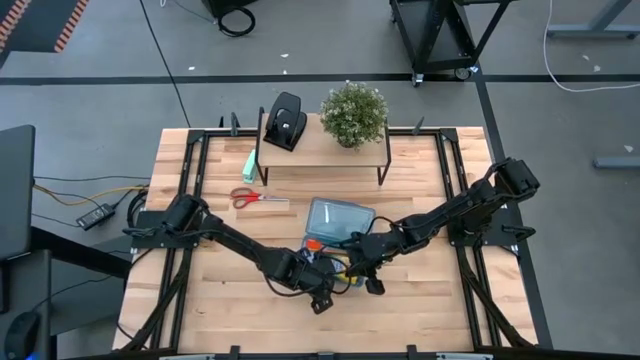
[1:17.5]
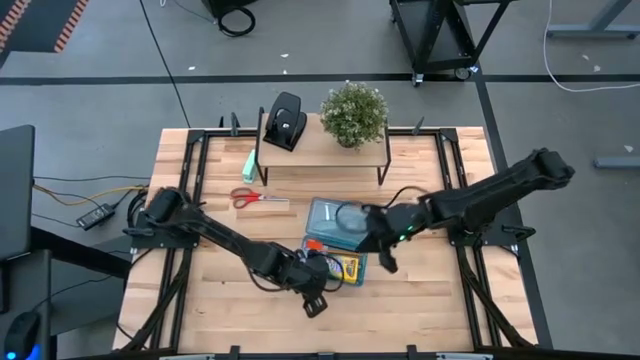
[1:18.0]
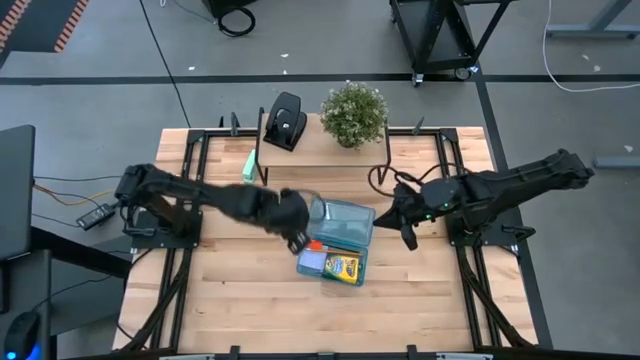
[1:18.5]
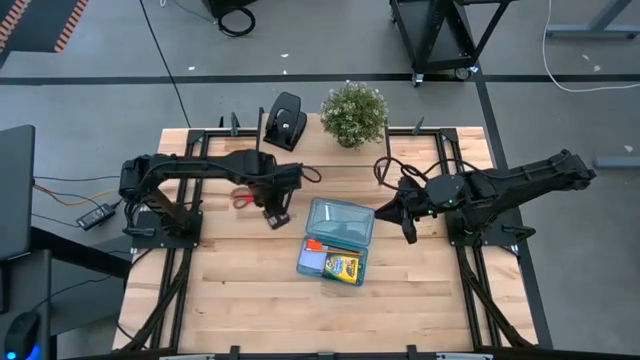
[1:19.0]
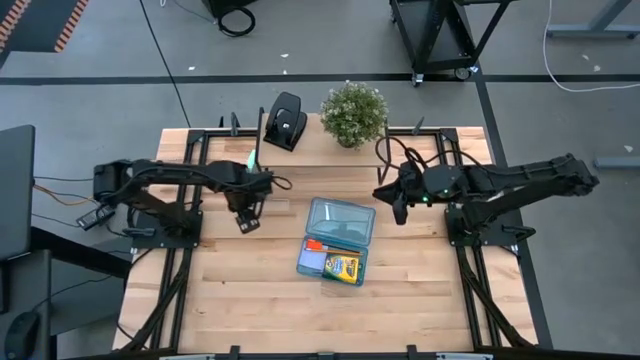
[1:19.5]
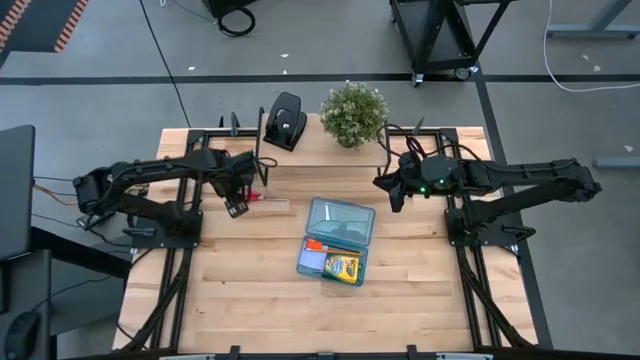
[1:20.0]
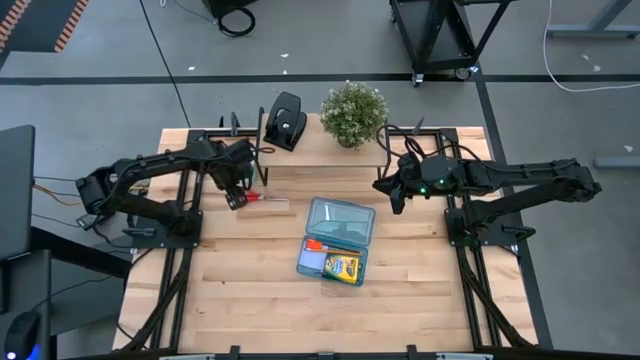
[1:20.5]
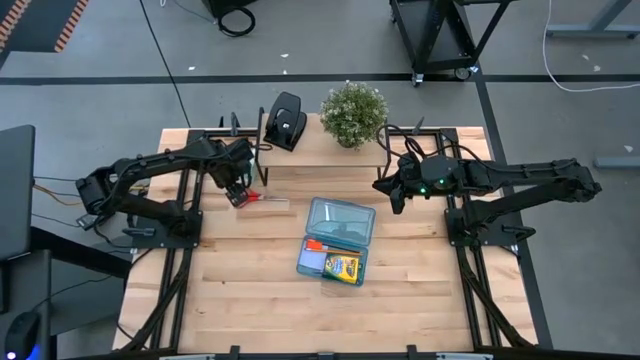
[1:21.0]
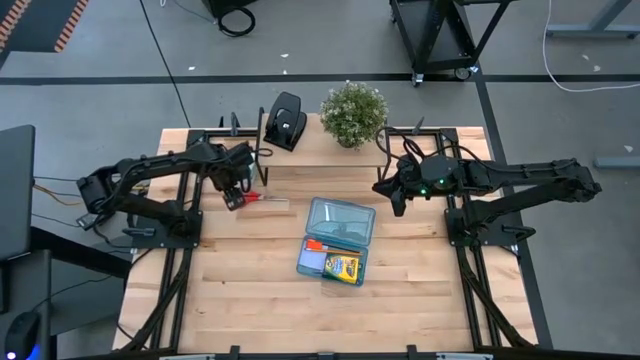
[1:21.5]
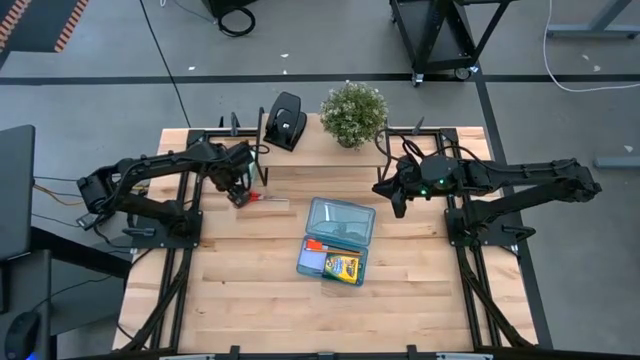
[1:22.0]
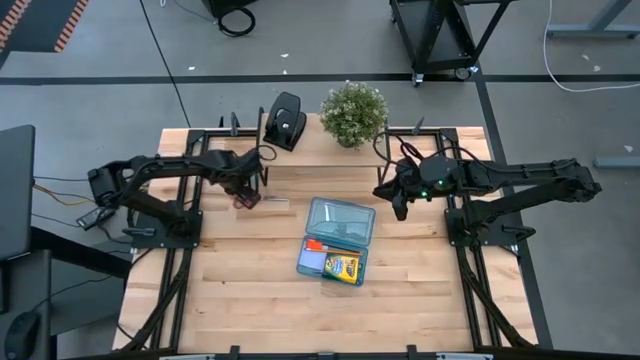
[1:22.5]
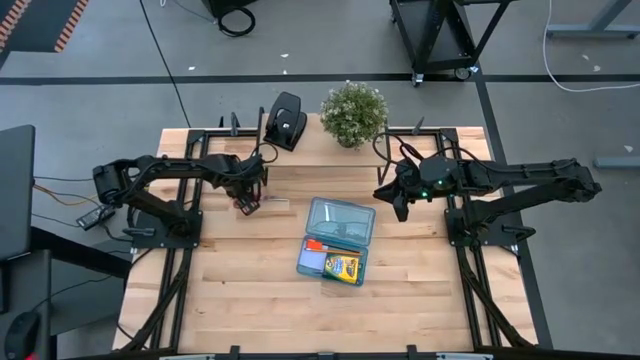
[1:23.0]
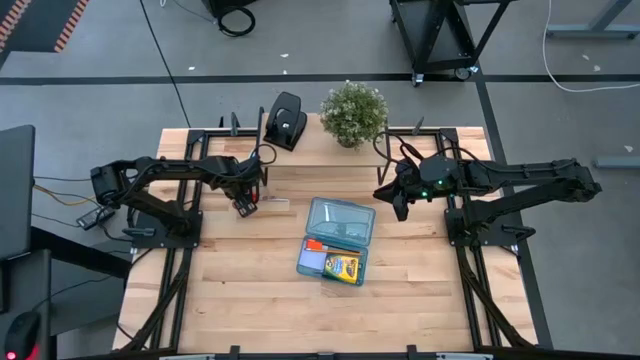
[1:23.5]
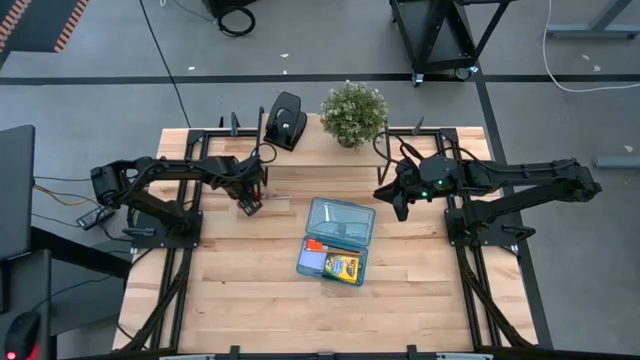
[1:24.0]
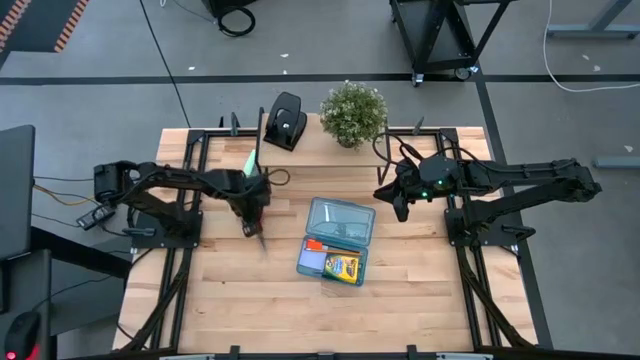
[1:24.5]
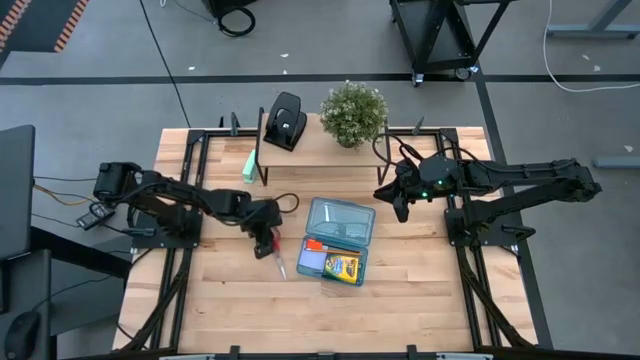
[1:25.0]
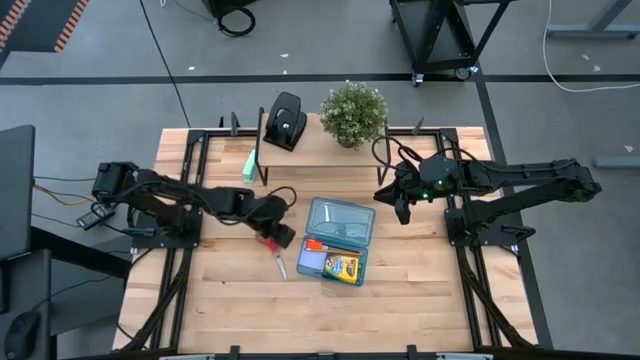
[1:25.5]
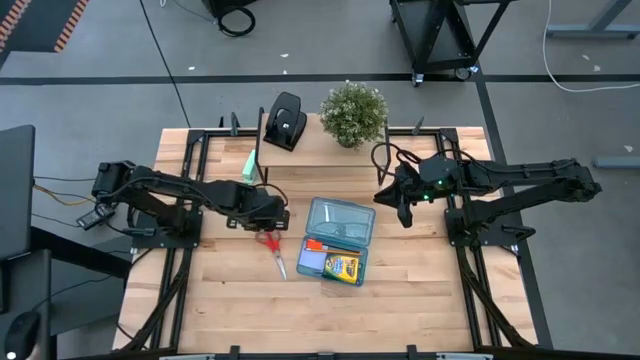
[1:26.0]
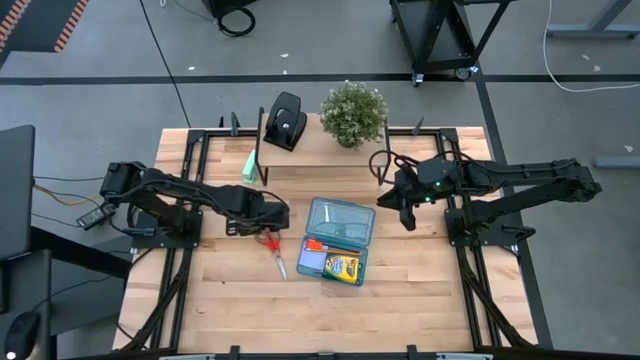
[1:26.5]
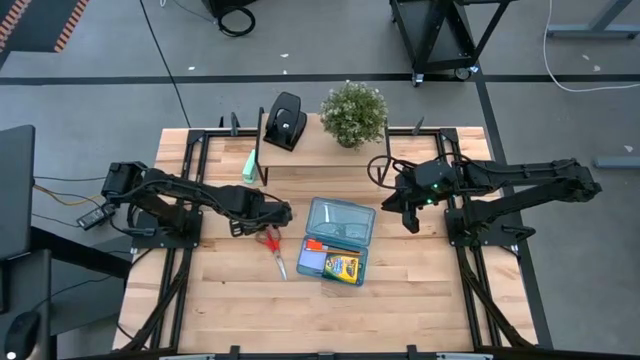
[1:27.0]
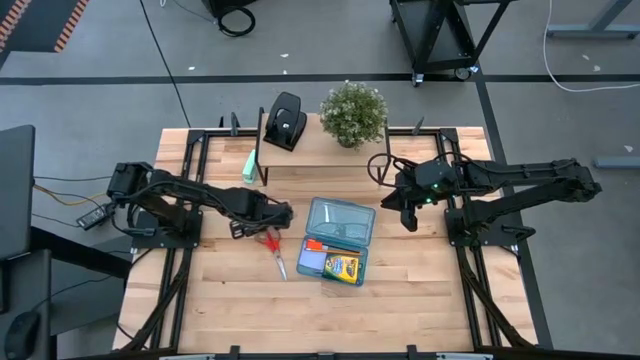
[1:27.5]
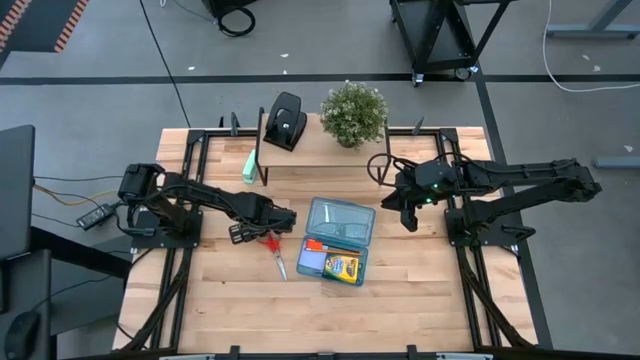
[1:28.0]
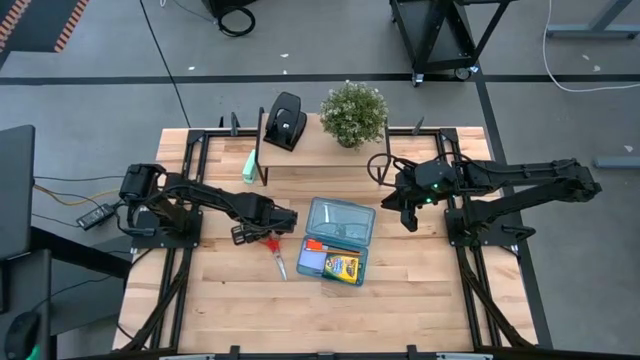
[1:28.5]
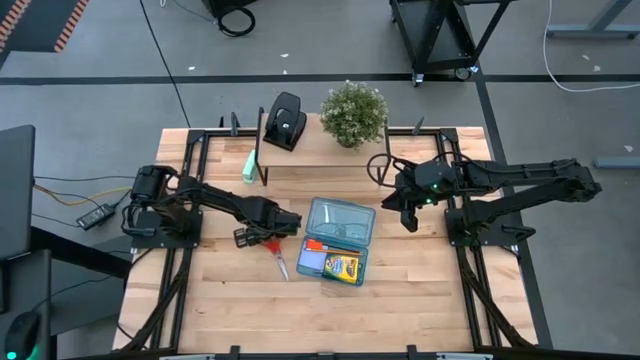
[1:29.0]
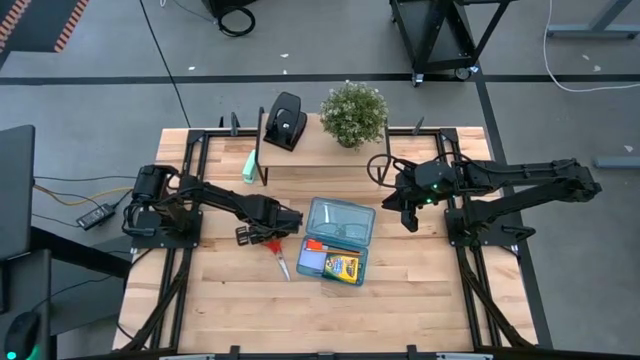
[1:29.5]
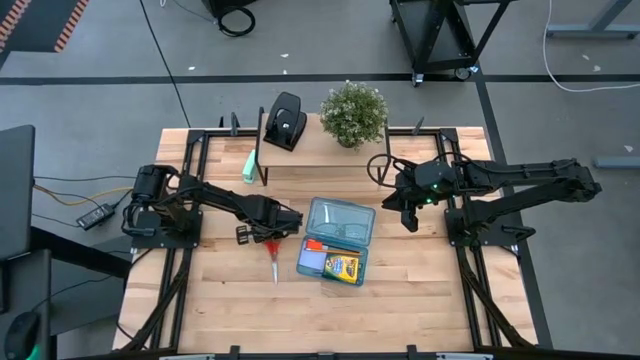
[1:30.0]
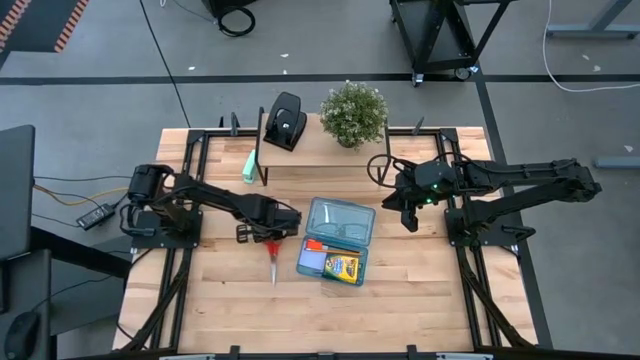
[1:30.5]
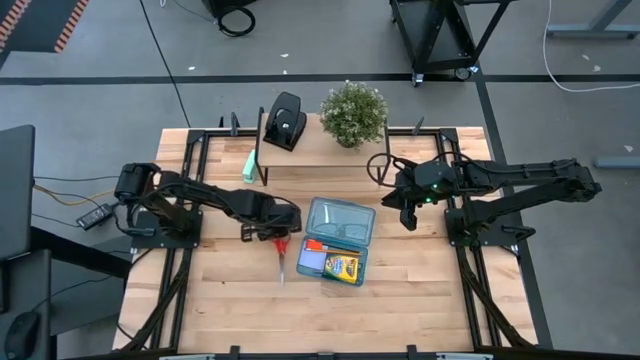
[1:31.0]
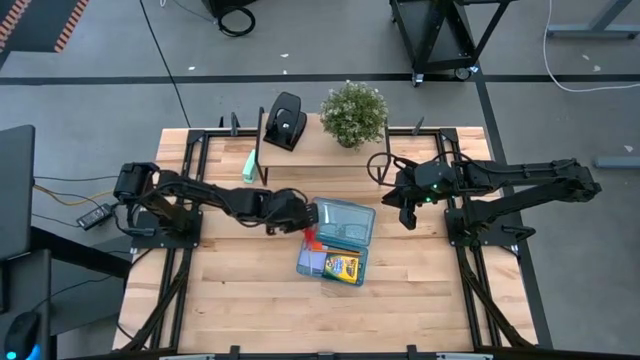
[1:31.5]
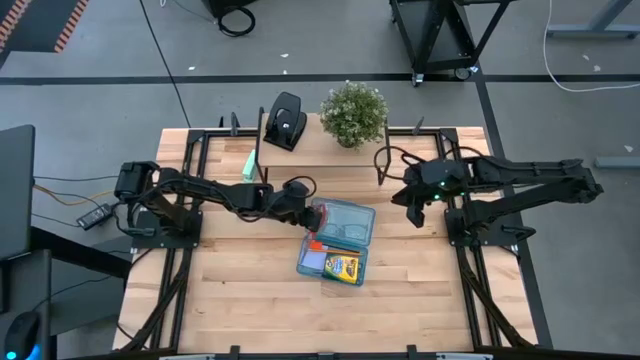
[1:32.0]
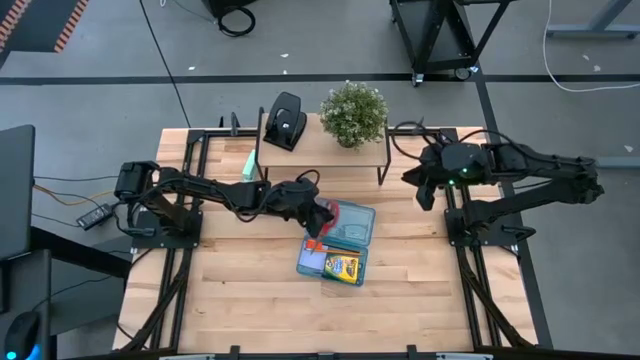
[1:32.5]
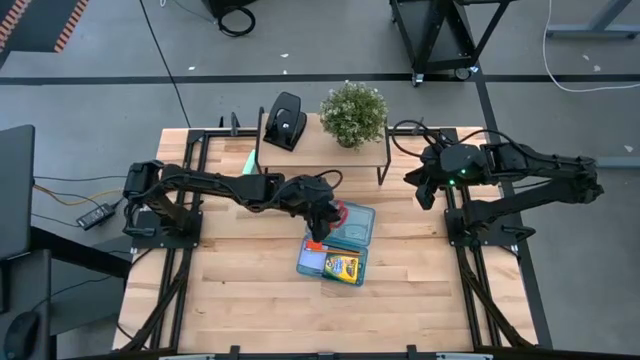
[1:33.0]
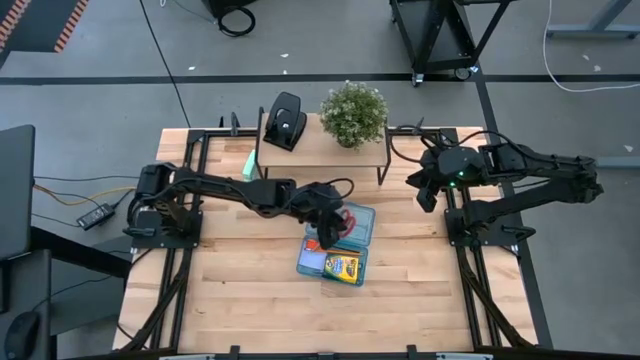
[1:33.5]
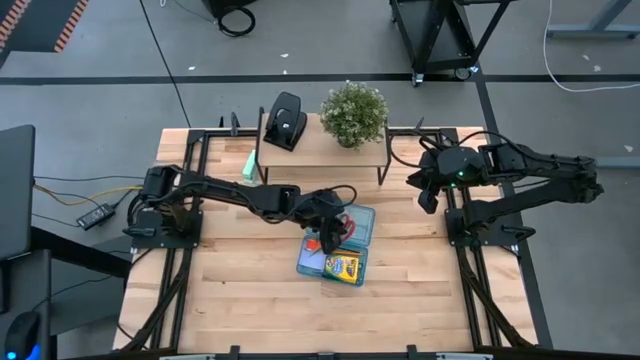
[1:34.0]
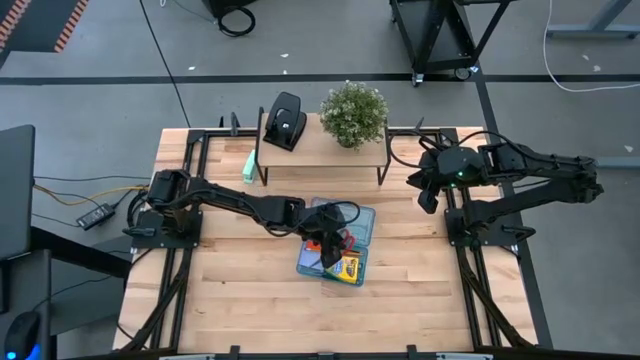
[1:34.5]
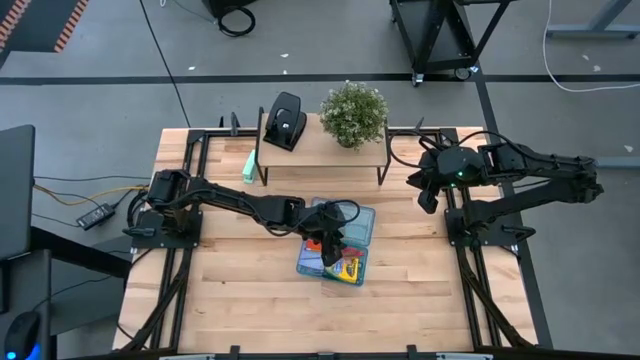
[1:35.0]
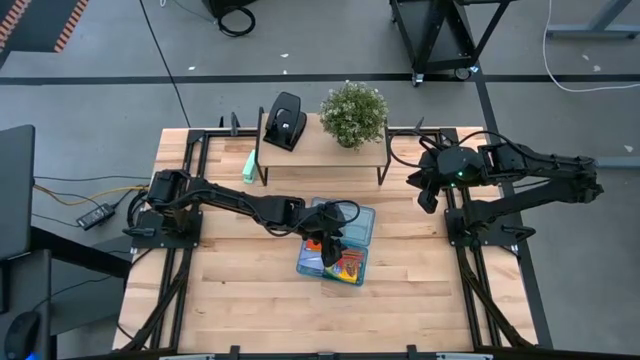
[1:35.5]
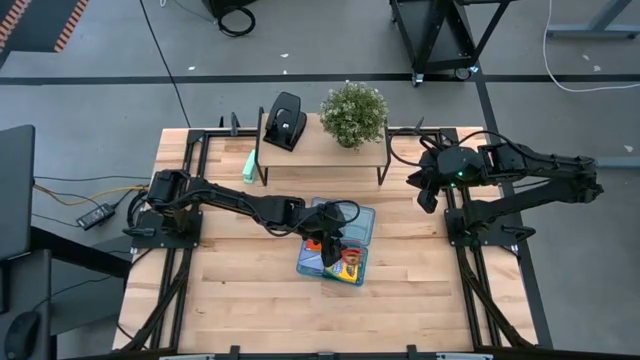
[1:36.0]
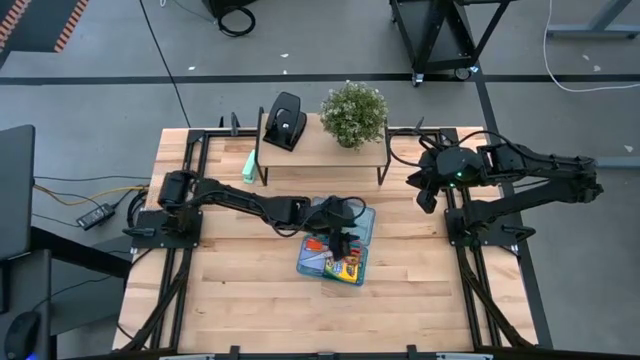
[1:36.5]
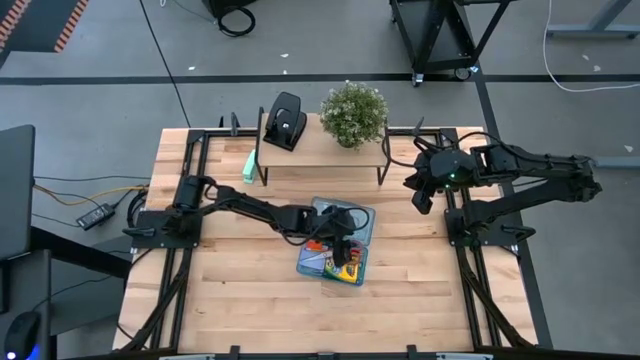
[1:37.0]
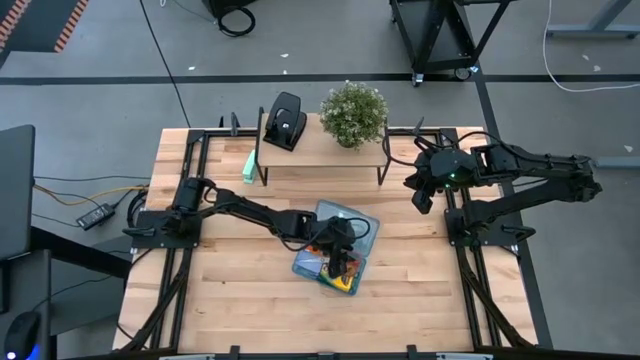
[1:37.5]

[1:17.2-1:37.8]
Task: Pack school essentials
Put the orange scissor into the blue supply box

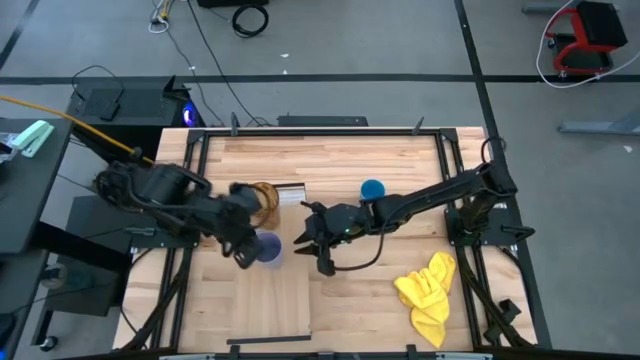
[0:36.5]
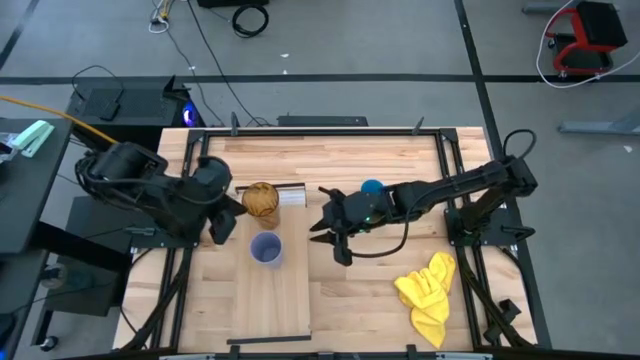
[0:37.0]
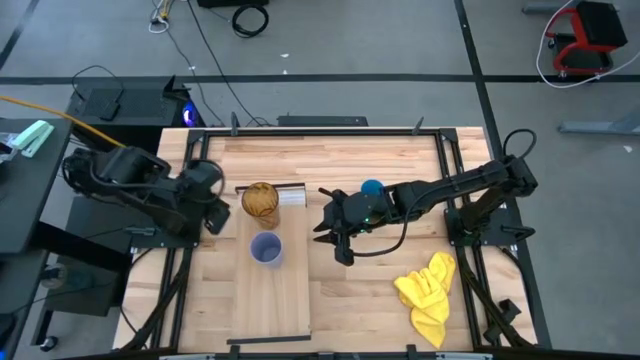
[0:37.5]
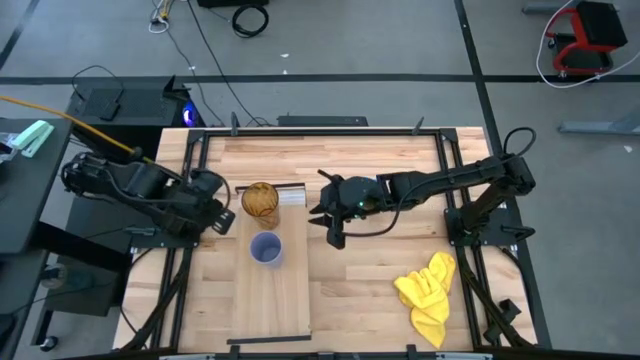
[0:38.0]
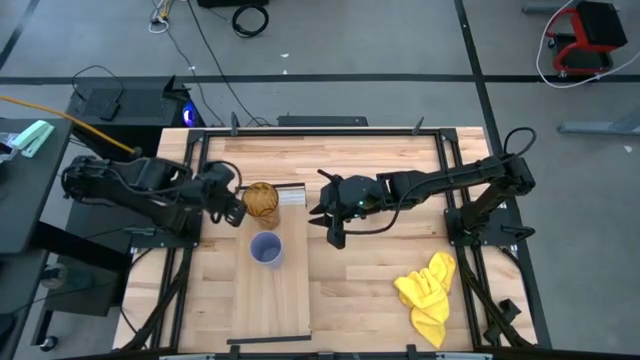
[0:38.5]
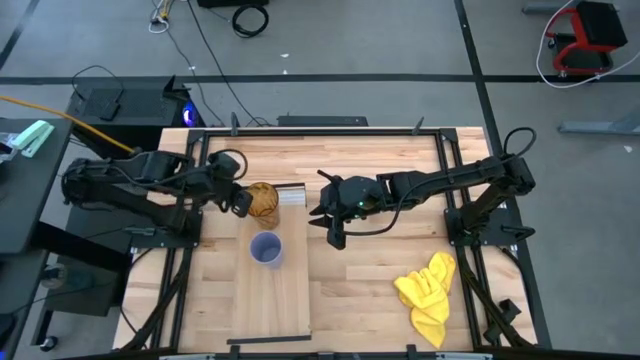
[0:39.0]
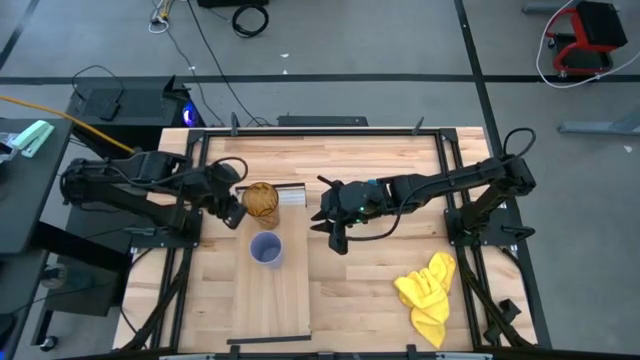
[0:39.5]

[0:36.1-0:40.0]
Task: Stack small to large cups/mugs on shelf
Adjust the brown cup
